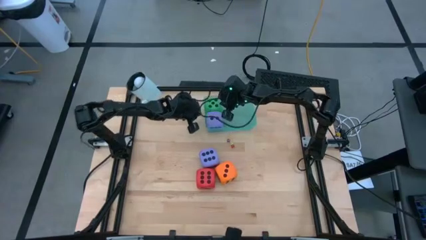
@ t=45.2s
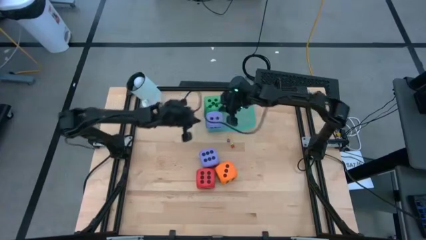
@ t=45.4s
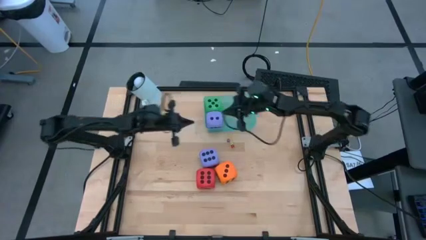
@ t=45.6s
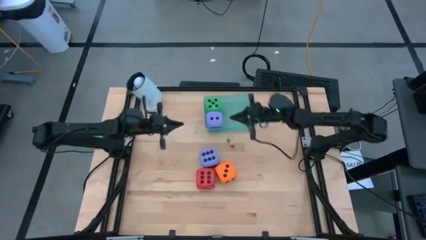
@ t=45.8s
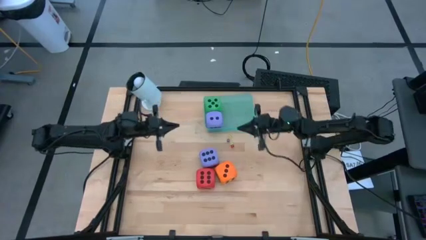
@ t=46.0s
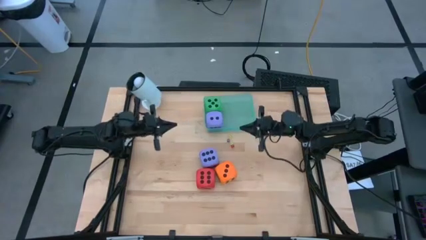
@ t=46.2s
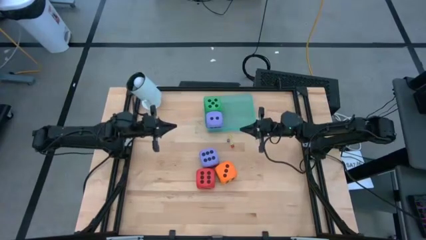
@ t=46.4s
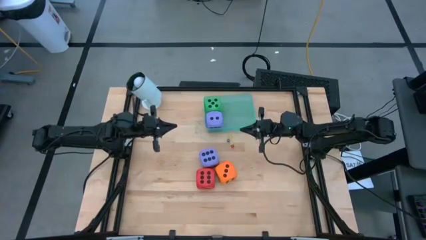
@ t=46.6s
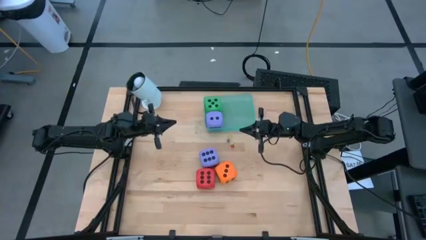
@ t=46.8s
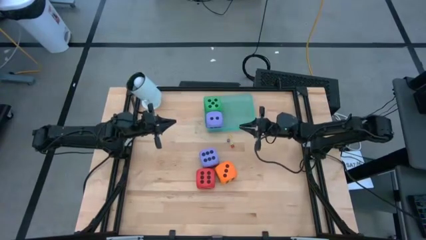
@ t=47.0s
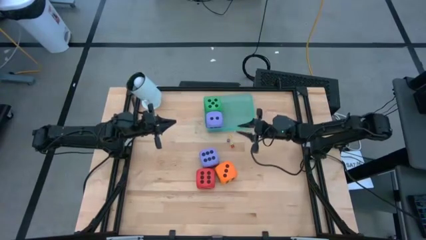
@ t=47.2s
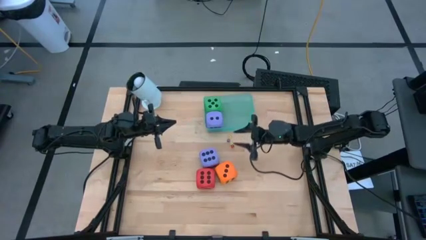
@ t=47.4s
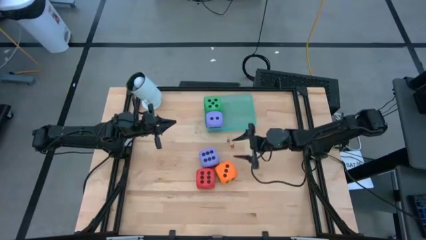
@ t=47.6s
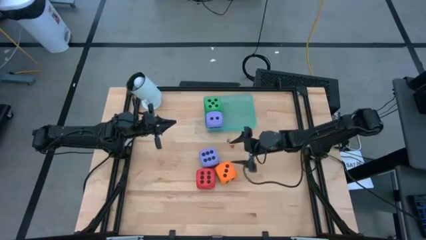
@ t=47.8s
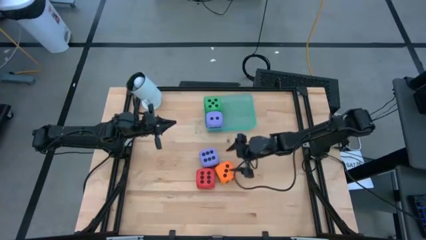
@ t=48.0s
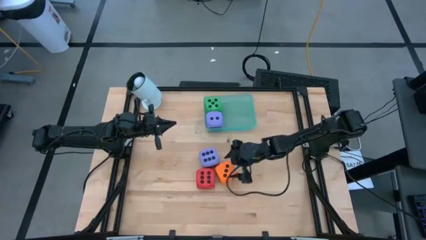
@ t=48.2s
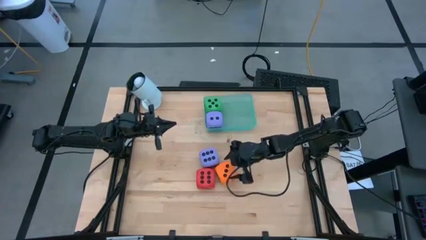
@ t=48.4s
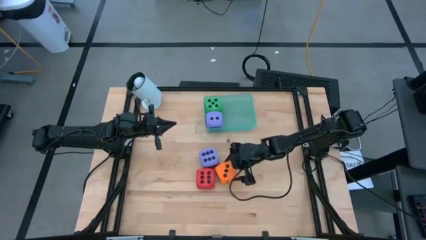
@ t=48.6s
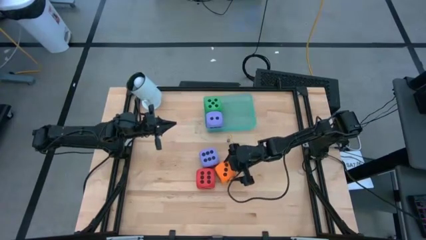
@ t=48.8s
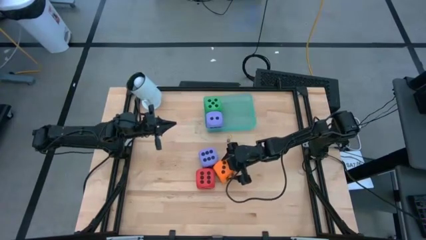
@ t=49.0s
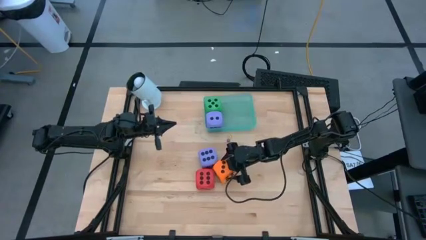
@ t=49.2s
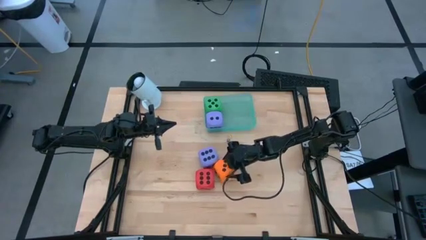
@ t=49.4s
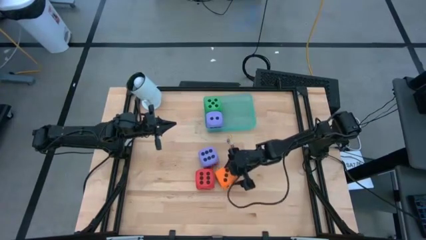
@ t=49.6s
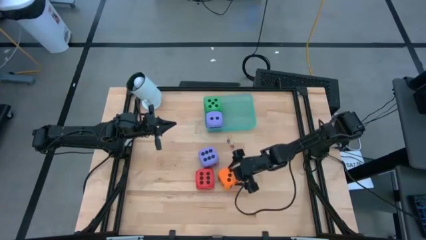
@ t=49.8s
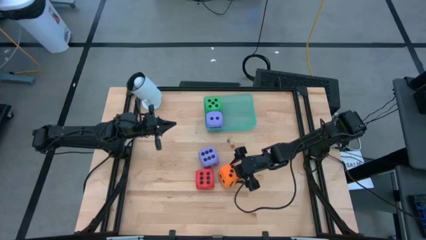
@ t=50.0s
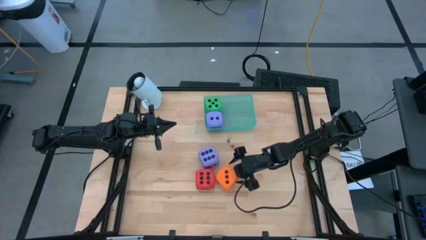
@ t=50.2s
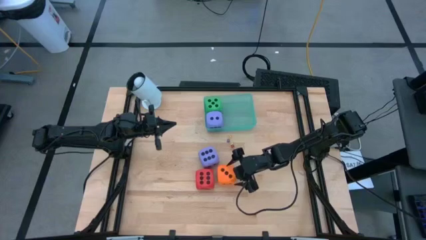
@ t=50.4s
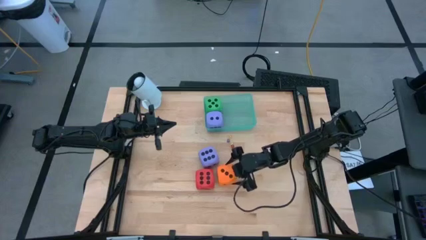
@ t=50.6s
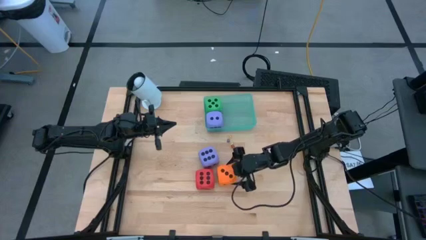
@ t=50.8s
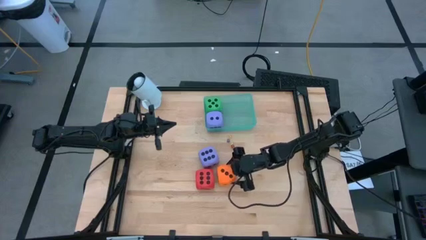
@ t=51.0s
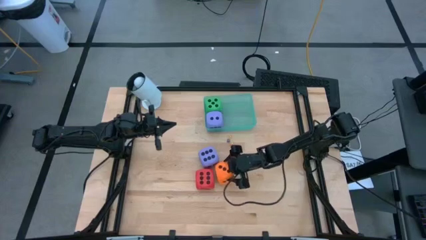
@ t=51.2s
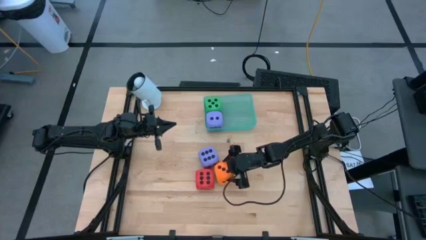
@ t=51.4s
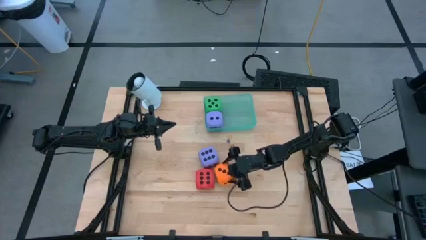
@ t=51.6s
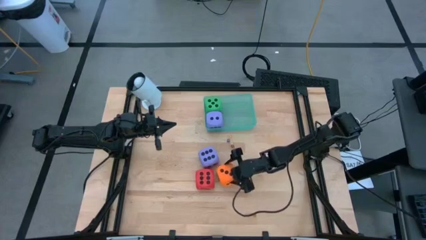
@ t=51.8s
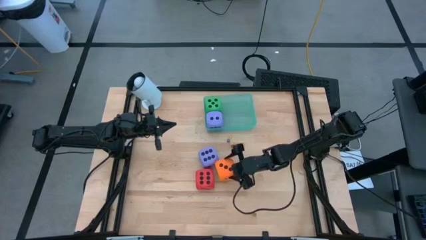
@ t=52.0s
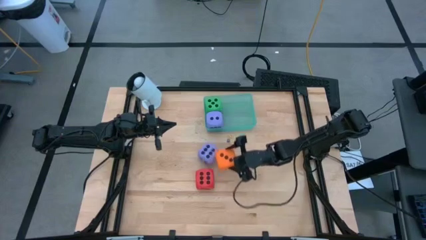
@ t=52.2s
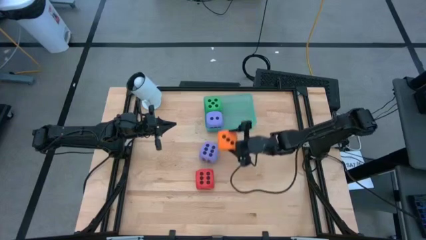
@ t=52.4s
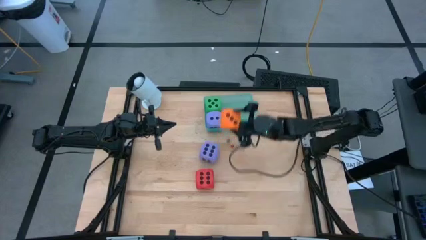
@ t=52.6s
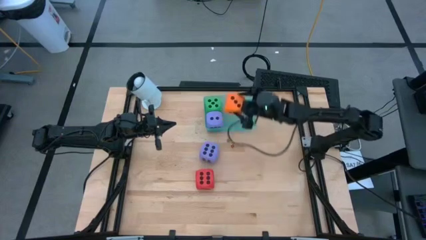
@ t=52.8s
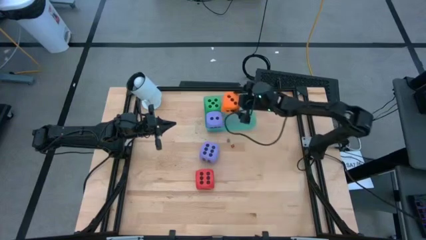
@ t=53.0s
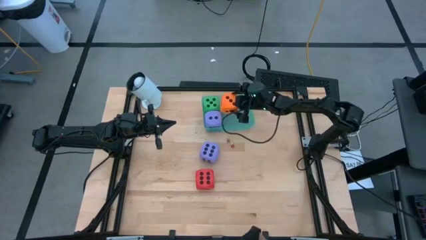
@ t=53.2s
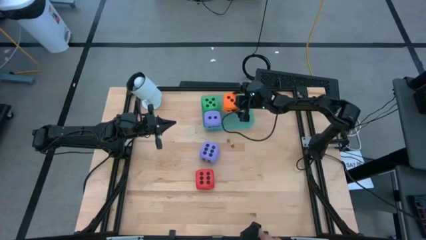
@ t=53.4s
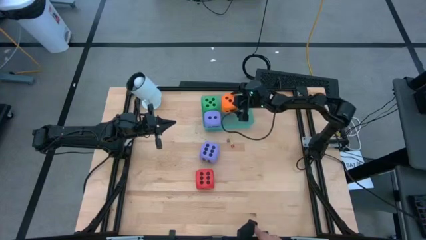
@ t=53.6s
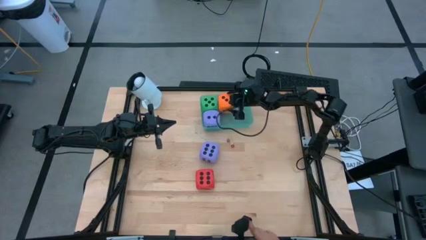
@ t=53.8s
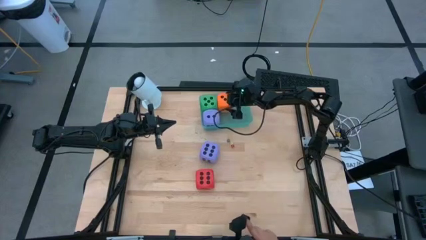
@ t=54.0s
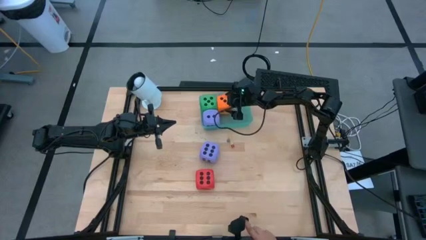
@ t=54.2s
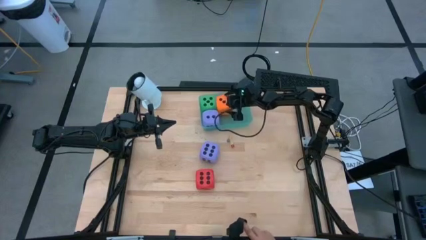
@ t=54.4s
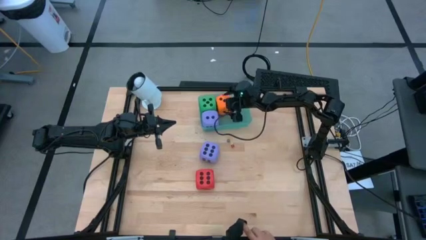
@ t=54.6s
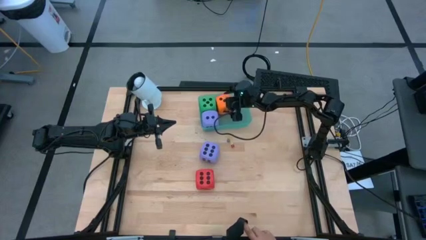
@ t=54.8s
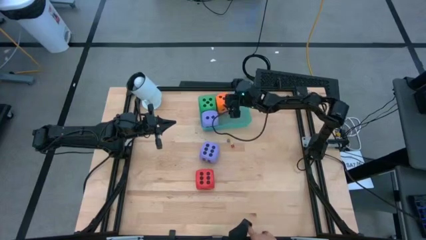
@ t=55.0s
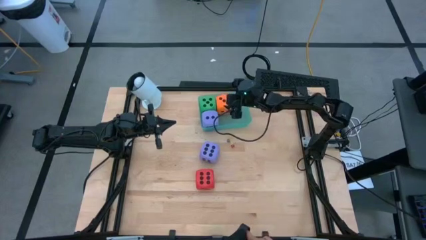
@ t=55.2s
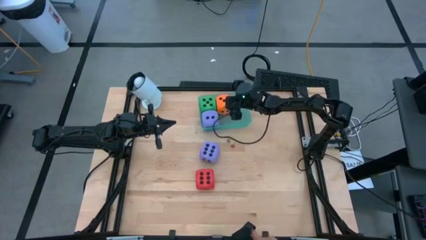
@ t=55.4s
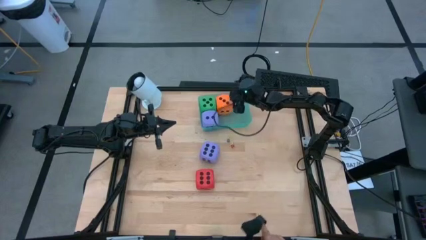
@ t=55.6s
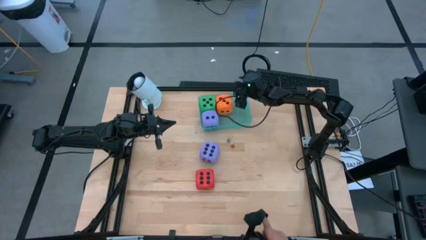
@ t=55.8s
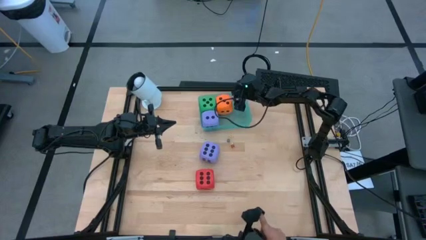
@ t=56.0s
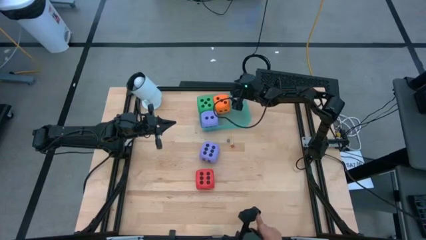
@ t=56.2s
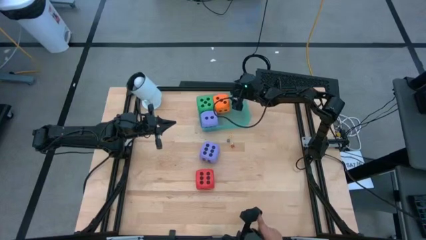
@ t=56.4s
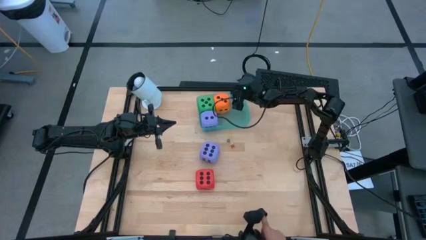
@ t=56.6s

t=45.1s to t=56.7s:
Task: Pick & Place Dice
Put the large orange dice into the green container

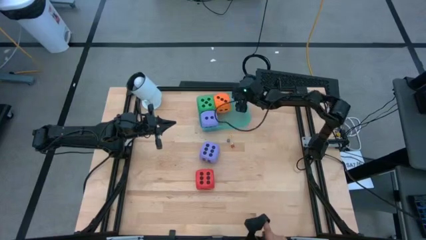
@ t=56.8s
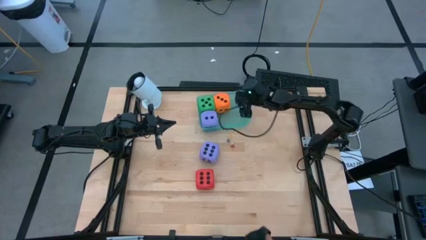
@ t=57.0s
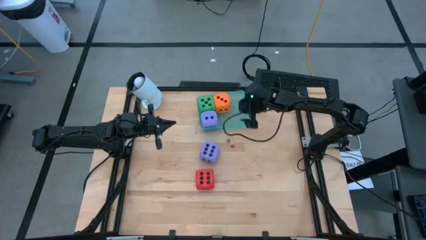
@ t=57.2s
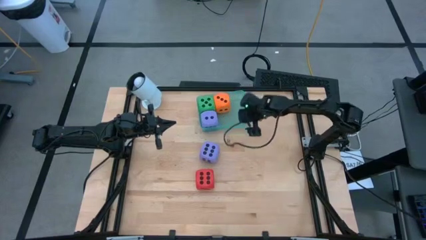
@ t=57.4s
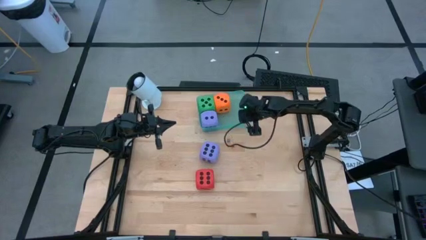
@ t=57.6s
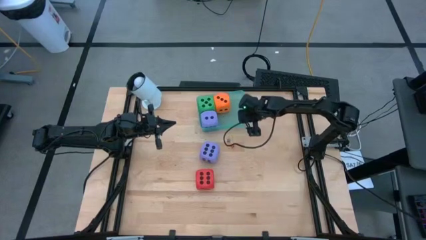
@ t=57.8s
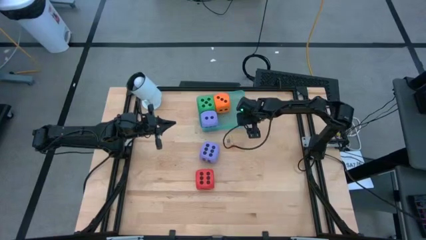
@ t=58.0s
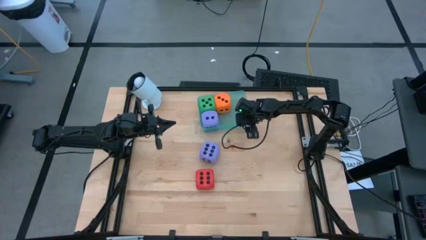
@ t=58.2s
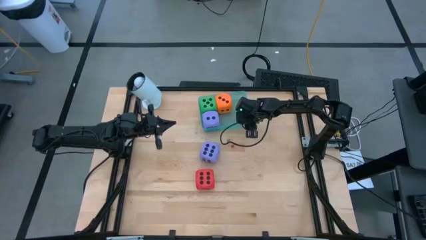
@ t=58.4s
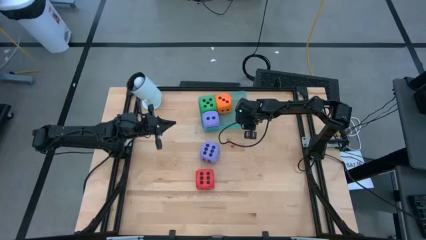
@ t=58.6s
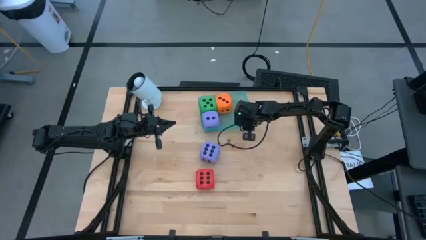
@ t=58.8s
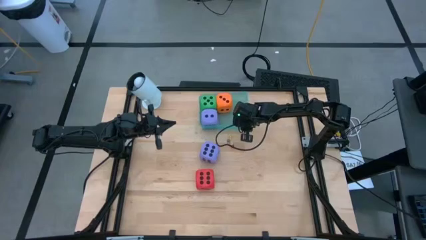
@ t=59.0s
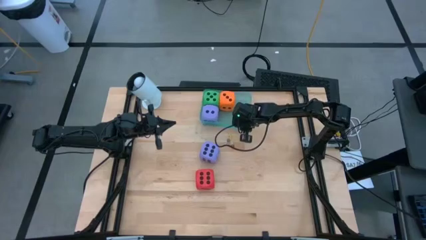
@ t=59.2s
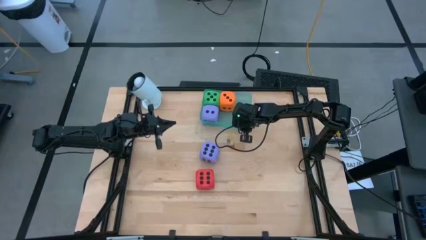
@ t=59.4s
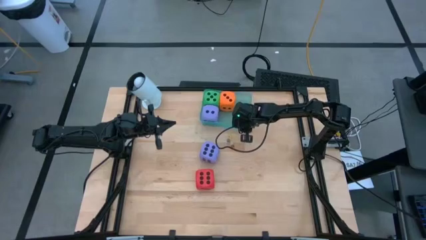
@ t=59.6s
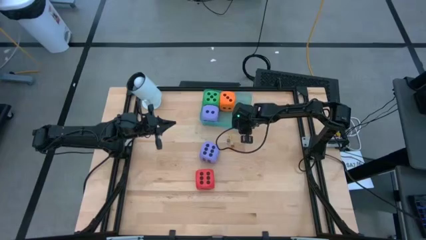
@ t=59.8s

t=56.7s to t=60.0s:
Adjust the blue container
